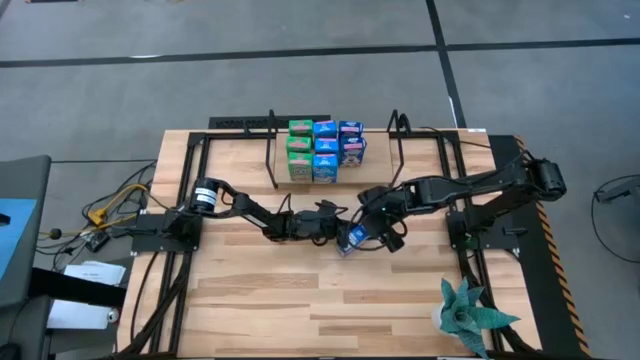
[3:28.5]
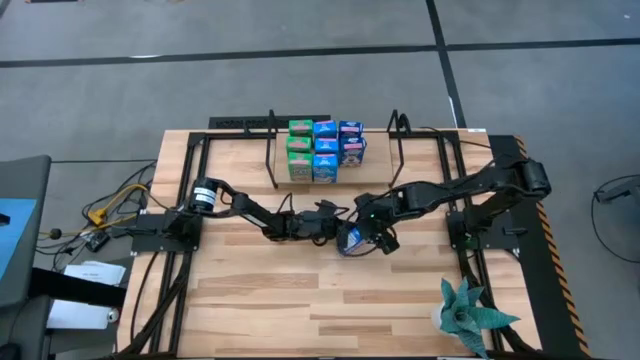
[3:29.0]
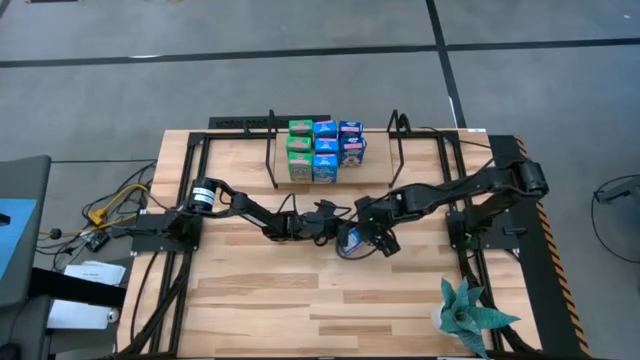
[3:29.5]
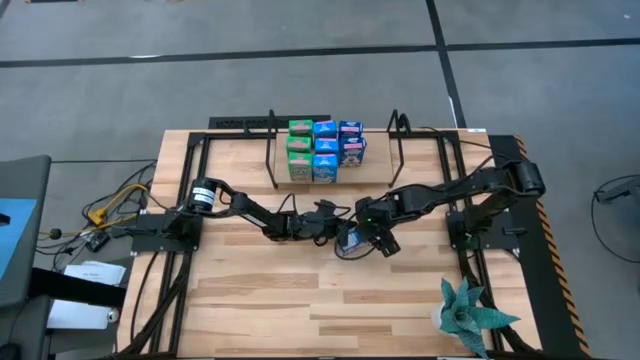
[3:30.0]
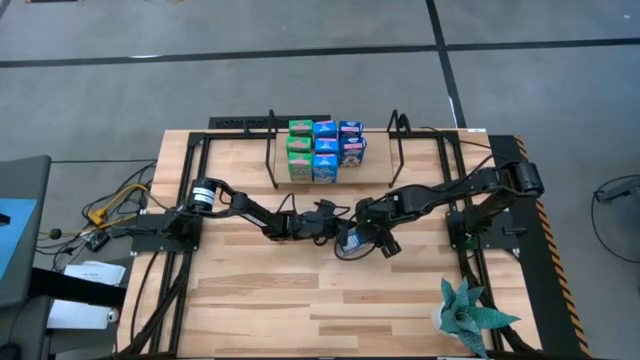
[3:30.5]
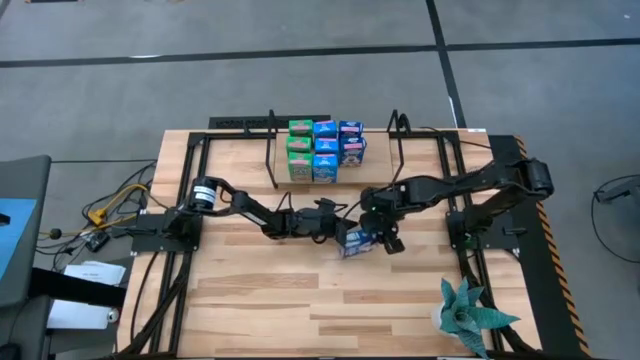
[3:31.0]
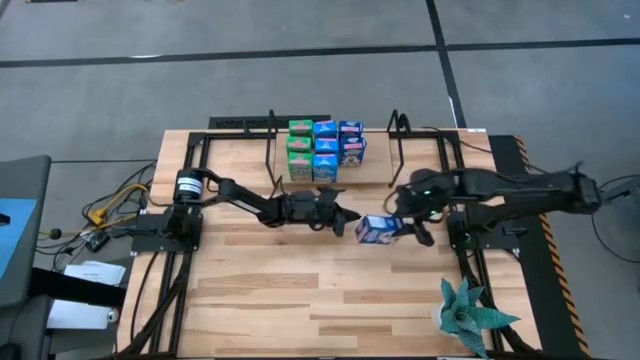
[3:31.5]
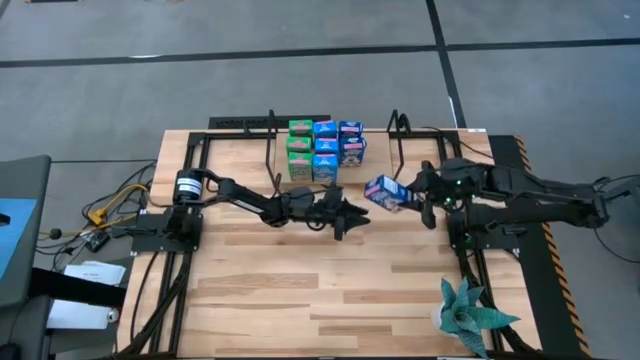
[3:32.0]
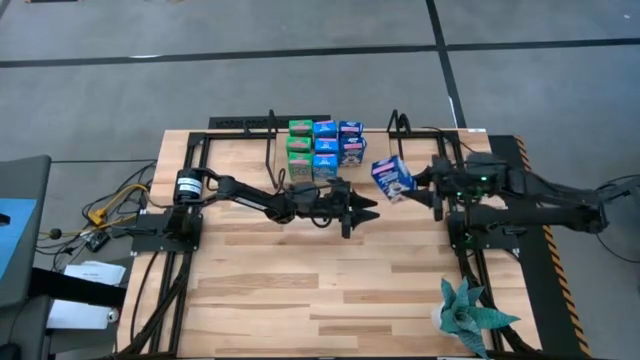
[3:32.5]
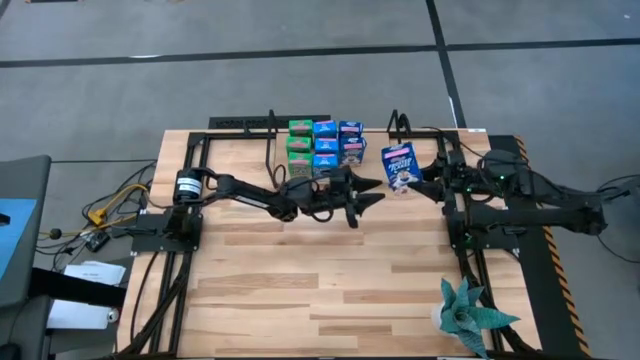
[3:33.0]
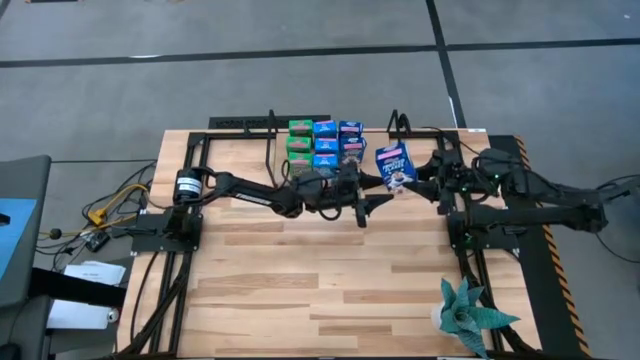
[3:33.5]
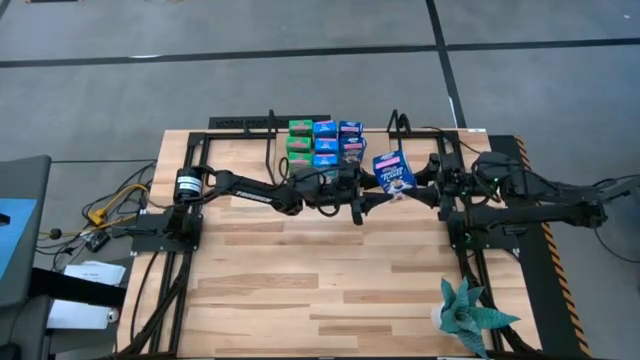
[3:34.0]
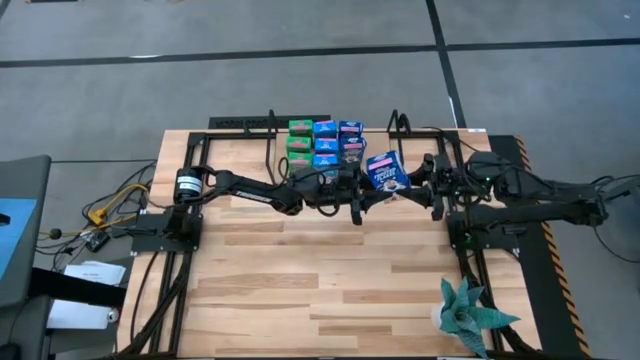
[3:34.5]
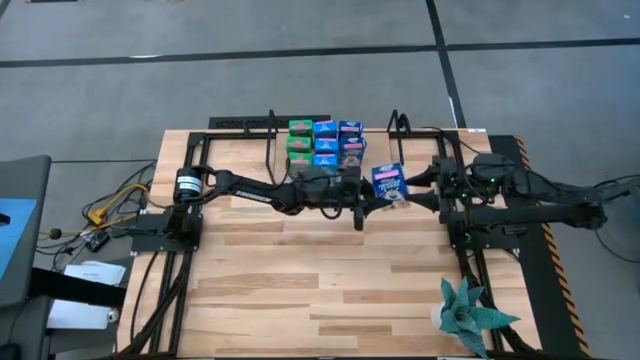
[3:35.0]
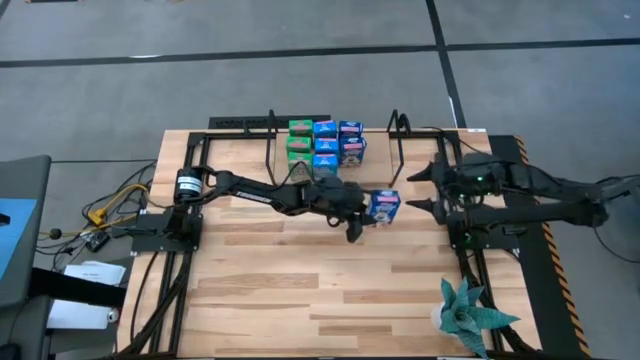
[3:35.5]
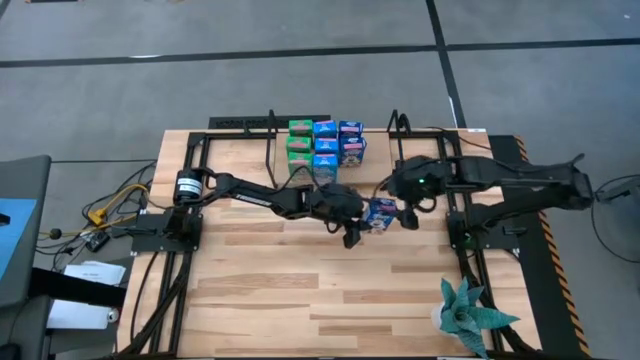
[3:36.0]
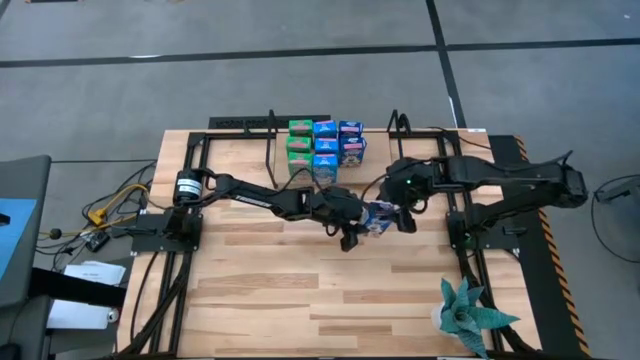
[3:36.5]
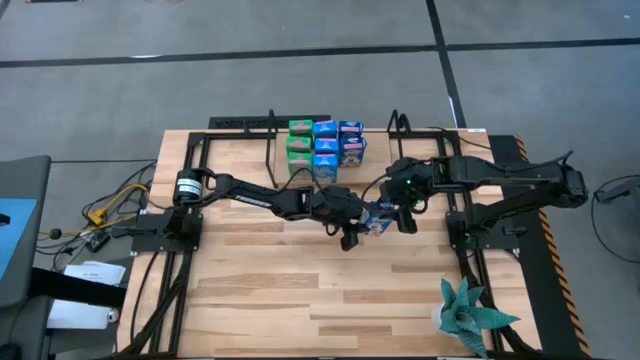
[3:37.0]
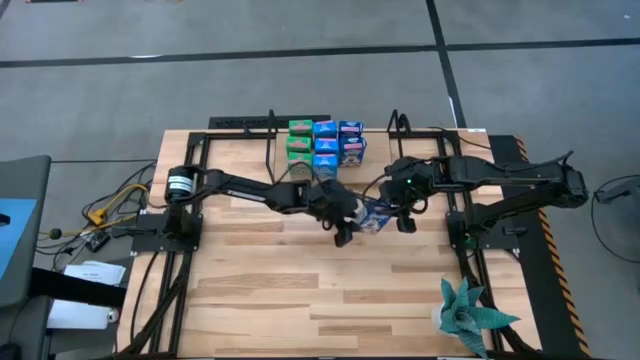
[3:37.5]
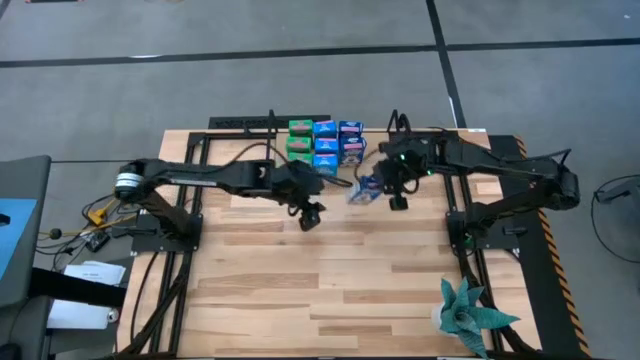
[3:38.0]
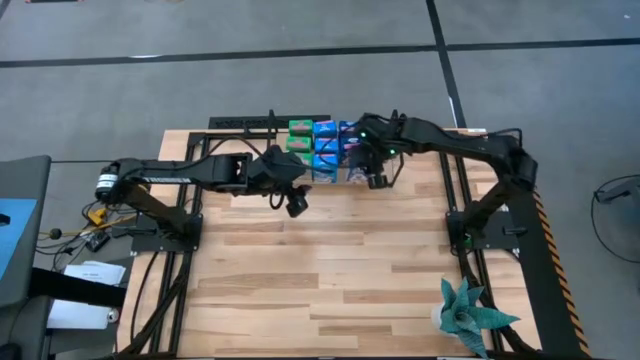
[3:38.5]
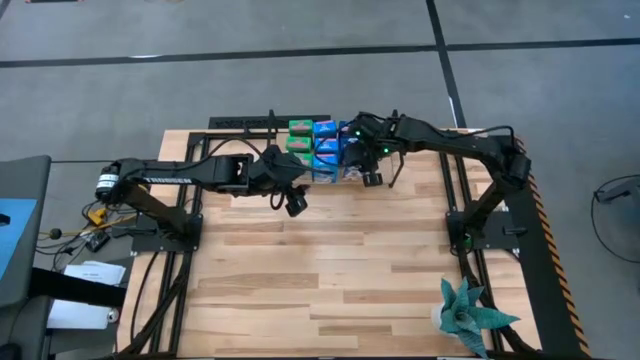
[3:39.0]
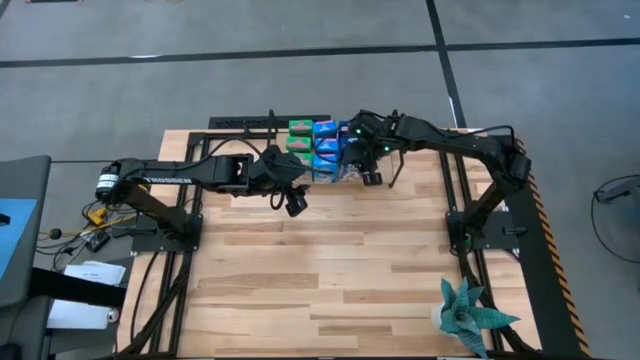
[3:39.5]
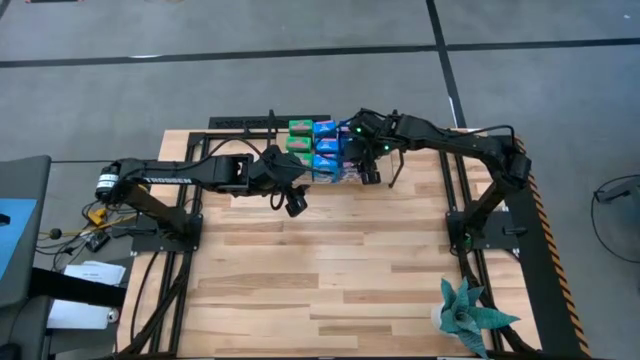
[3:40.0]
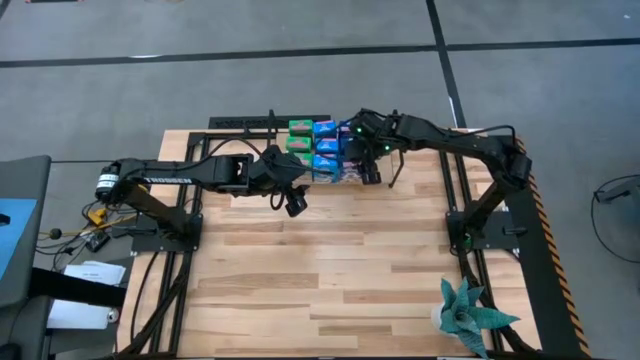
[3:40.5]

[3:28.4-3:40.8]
Task: Stack cereal on shelf
Put the blue cereal box on the shelf aligned with the other blue cereal box

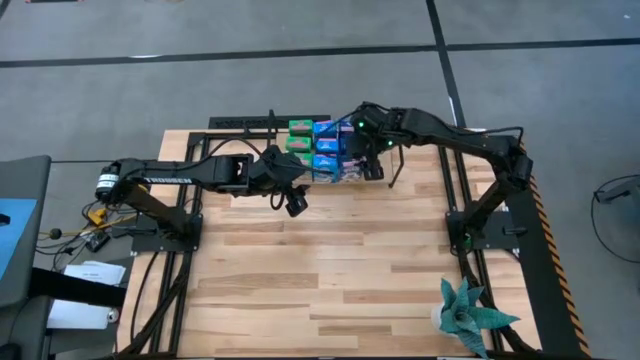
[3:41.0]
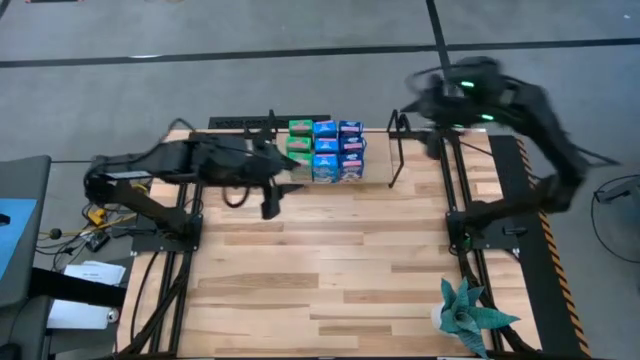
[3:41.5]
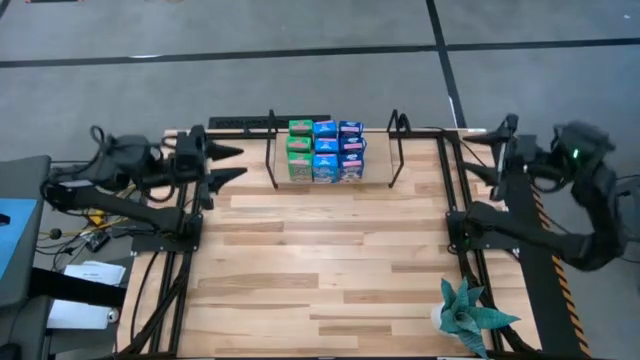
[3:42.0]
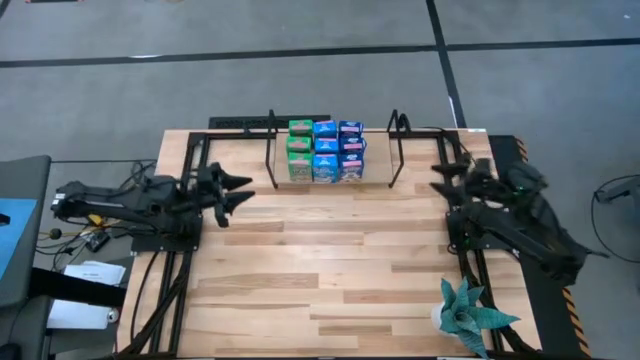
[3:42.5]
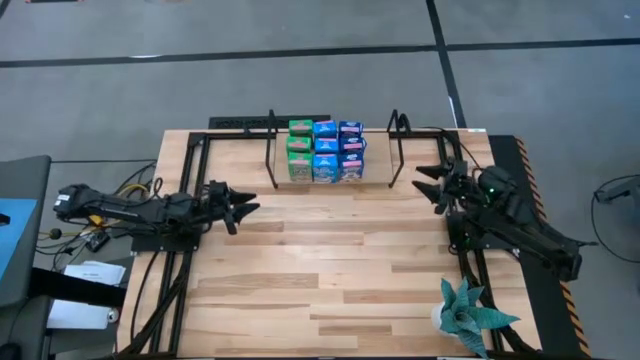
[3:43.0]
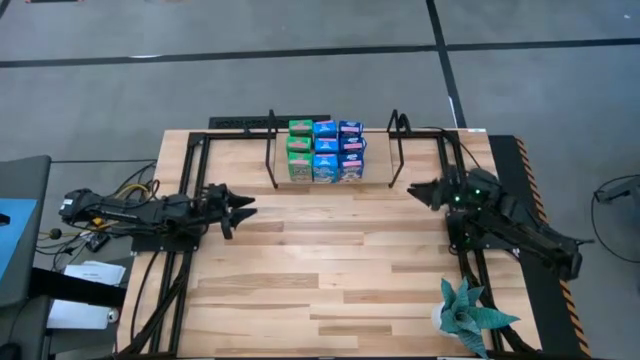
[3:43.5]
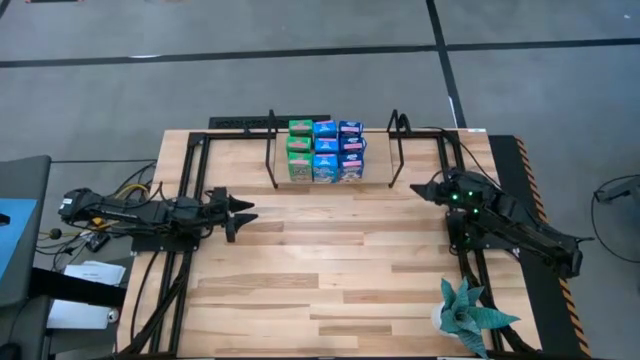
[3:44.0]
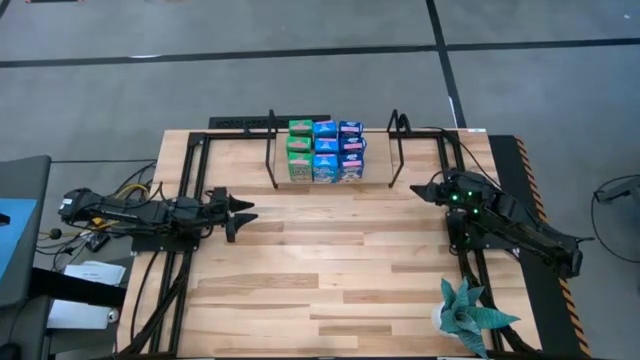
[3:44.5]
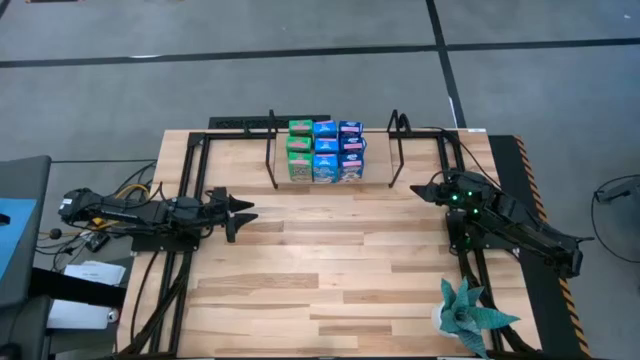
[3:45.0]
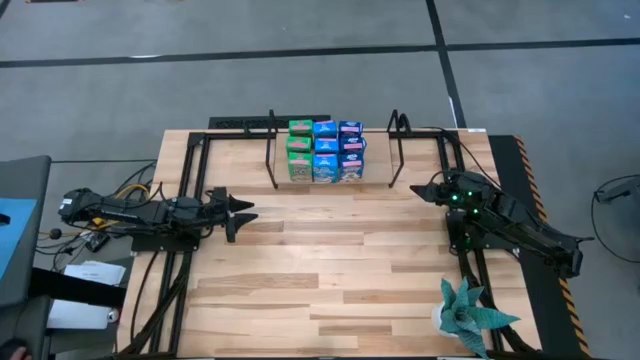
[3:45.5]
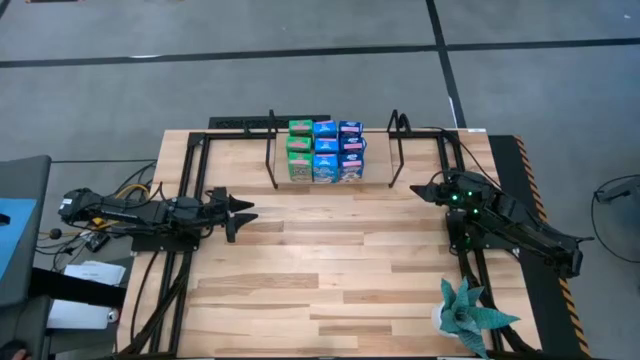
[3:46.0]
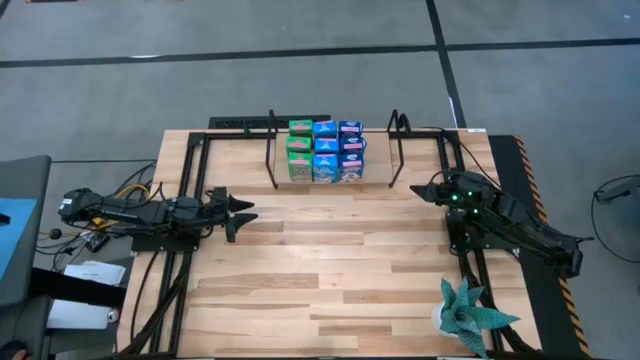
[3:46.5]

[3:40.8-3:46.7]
Return to Home Position
